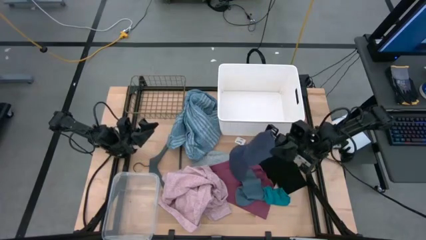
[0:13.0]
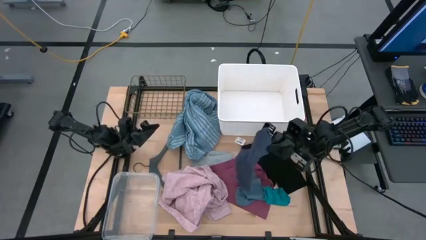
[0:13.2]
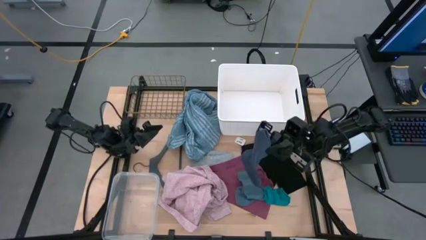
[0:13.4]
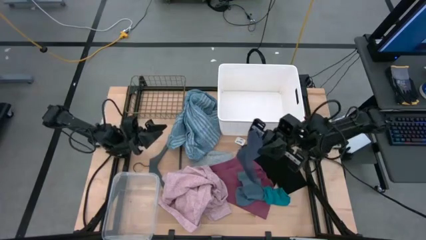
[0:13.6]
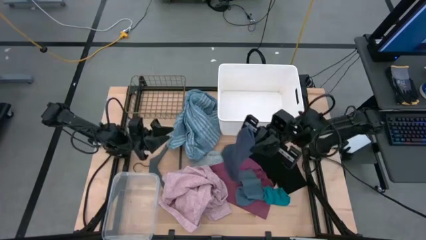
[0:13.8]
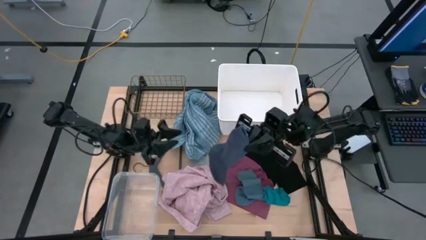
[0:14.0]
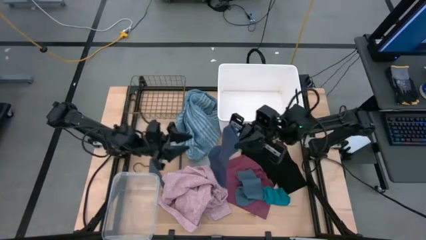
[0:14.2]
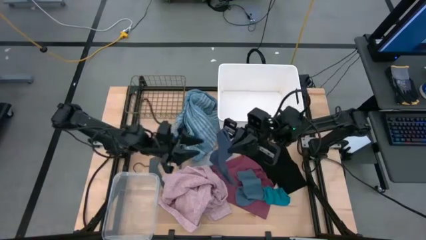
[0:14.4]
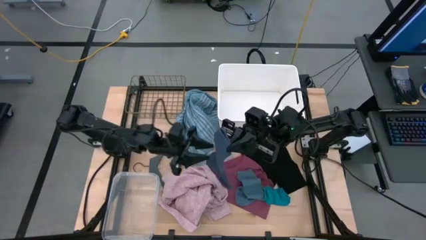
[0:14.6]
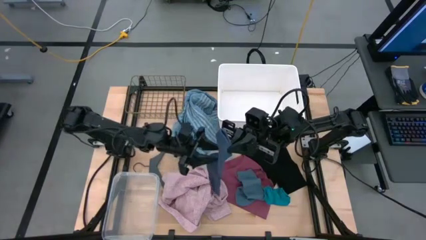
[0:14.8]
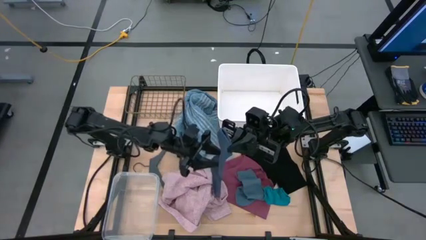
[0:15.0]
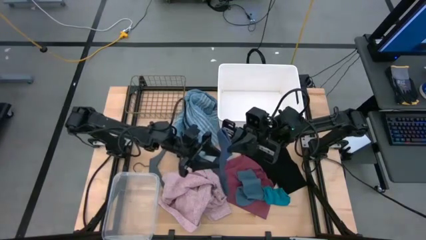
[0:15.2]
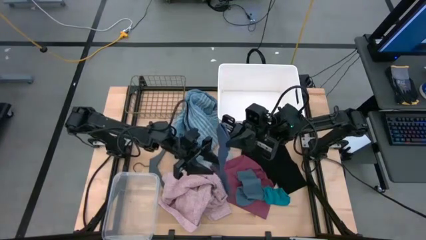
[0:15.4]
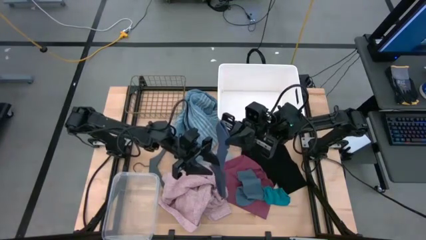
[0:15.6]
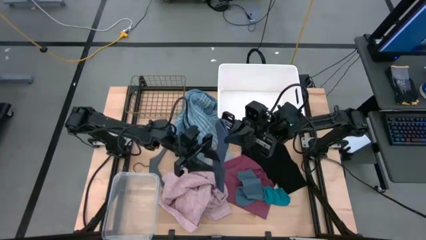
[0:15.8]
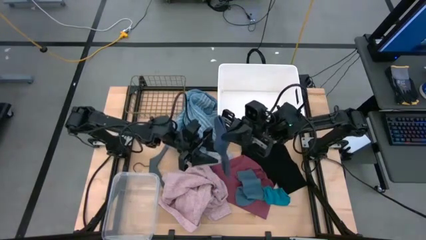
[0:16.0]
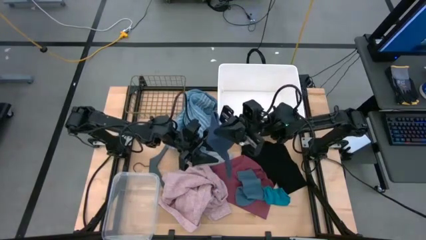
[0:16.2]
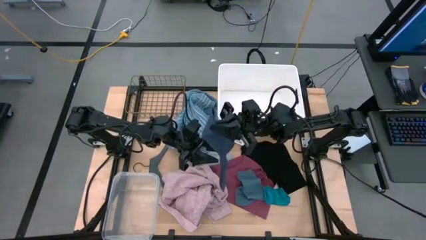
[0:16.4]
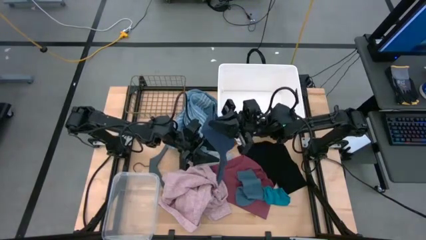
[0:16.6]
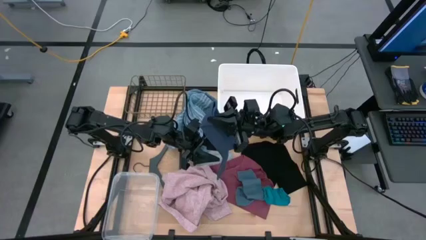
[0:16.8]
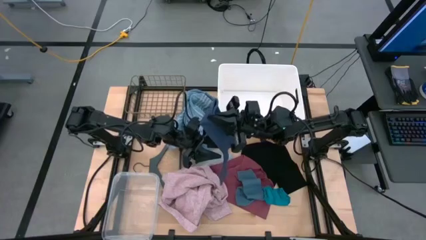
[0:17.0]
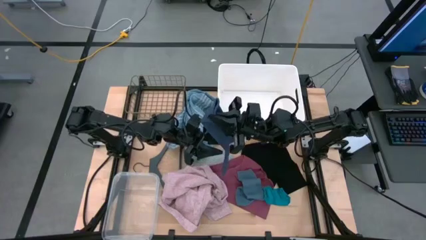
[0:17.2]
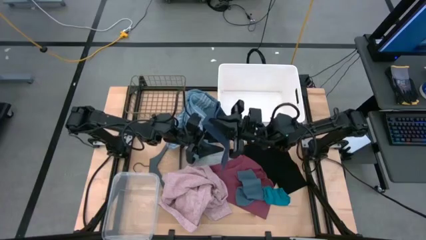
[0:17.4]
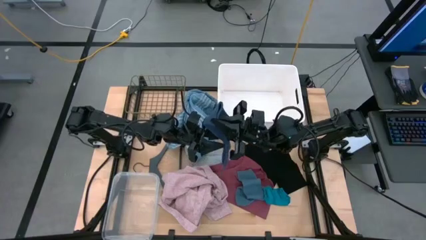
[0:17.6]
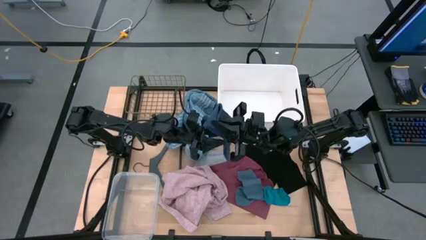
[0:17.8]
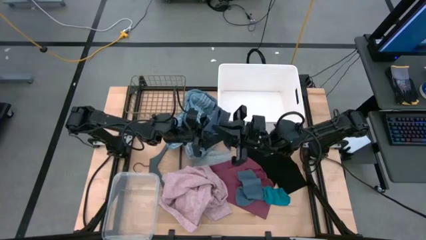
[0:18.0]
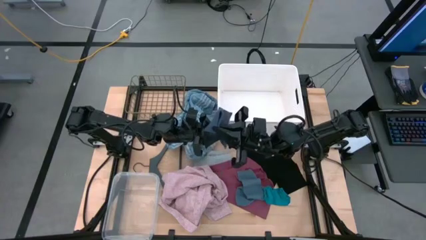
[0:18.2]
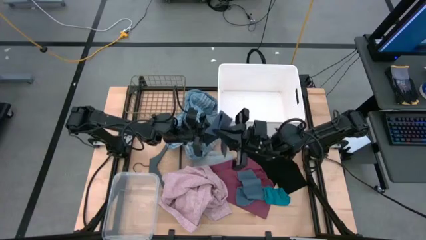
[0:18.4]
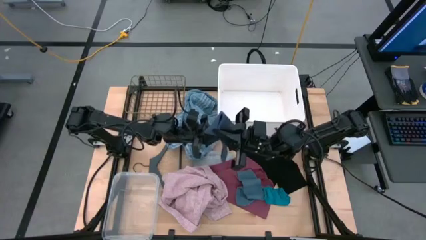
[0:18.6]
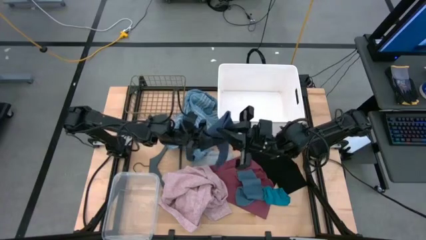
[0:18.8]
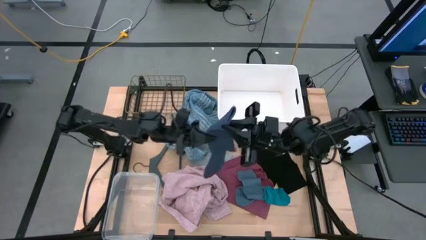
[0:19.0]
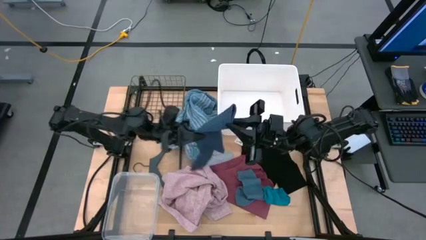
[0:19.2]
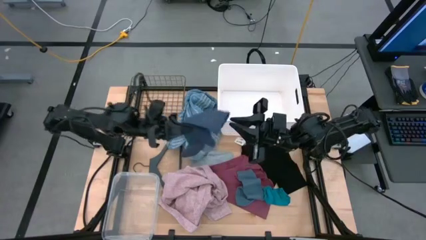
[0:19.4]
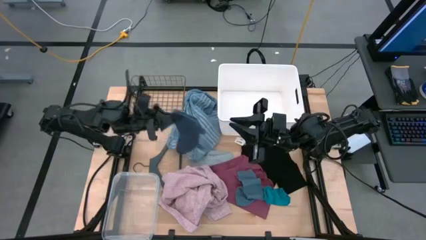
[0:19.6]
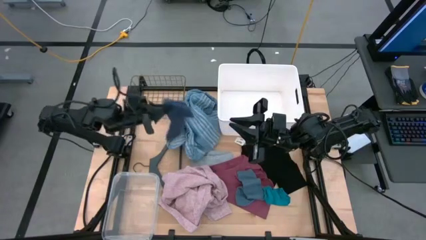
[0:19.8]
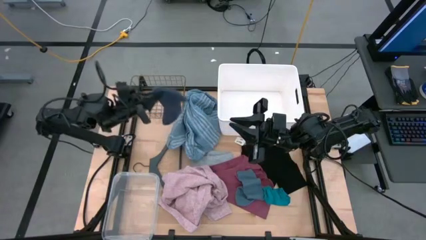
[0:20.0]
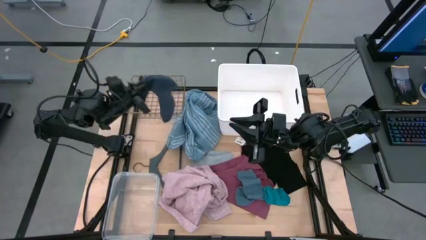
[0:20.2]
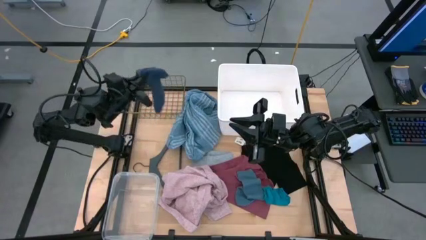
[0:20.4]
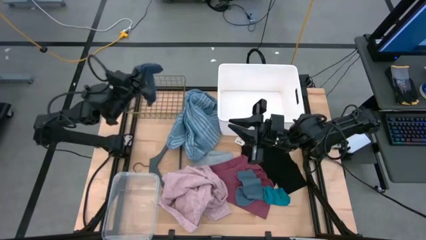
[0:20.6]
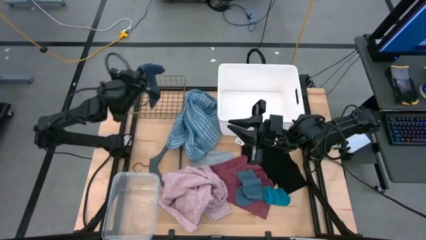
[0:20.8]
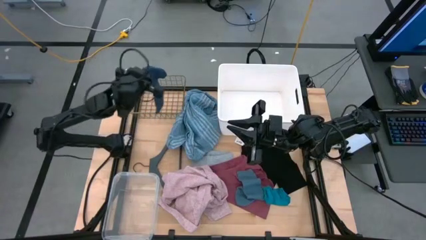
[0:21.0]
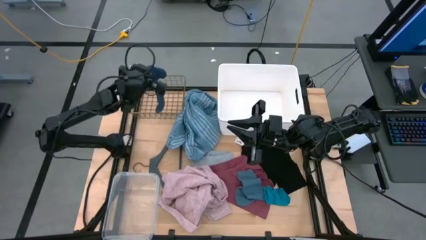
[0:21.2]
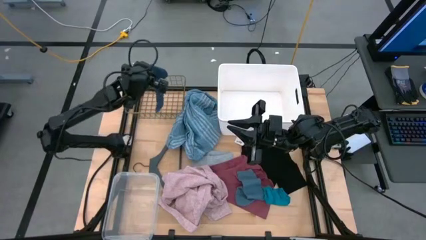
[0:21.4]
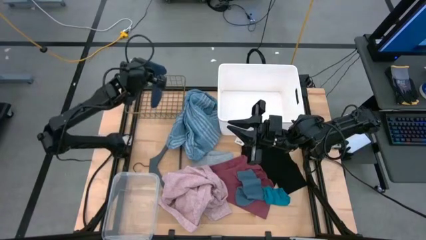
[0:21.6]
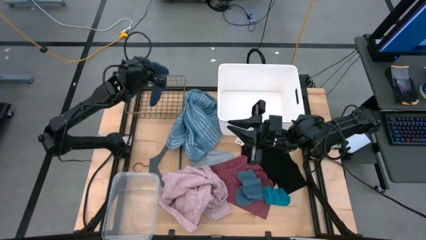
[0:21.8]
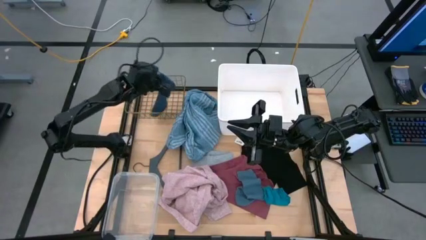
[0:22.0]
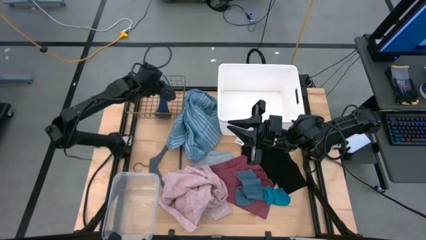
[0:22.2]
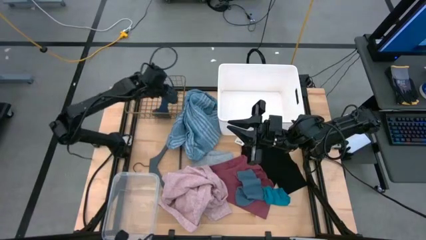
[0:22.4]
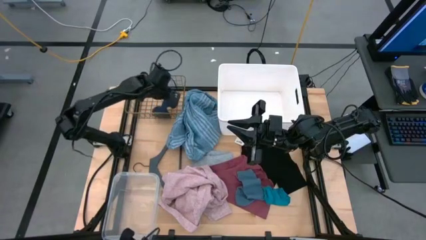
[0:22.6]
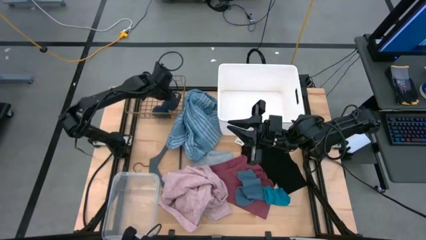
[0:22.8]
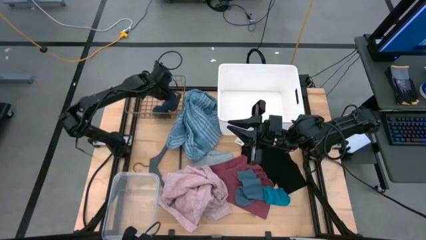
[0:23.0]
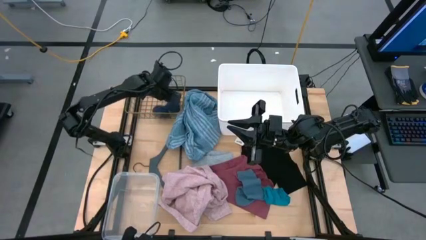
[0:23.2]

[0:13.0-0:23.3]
Task: Pick & Place Cloths
Put the dark blue sock into the wire basket

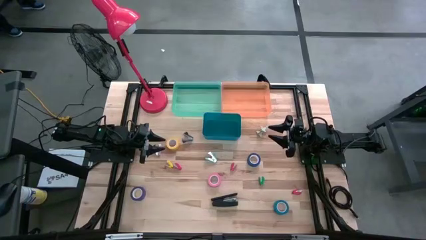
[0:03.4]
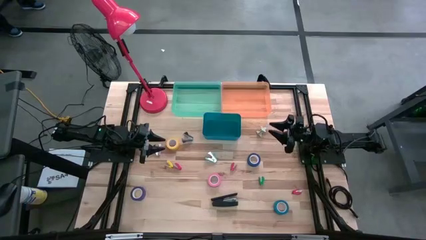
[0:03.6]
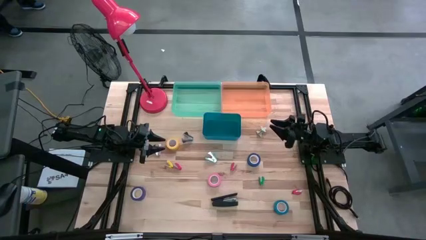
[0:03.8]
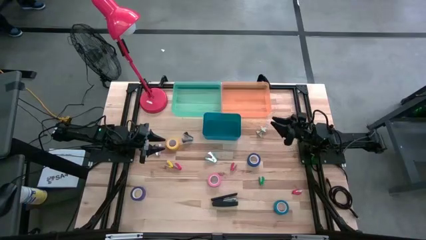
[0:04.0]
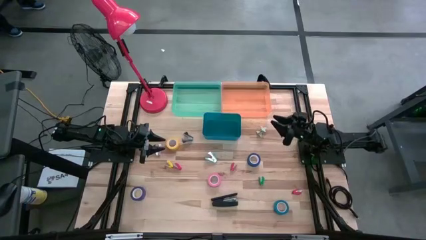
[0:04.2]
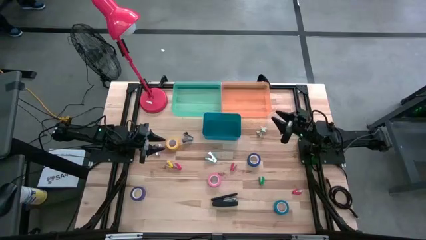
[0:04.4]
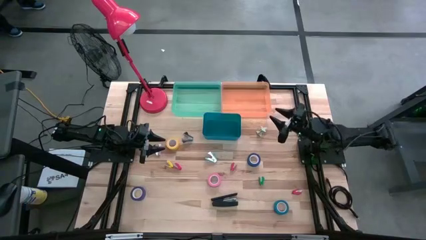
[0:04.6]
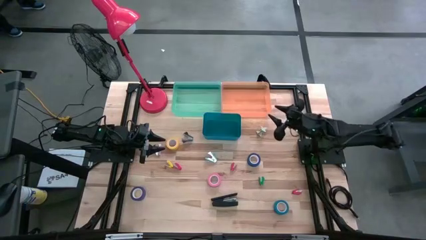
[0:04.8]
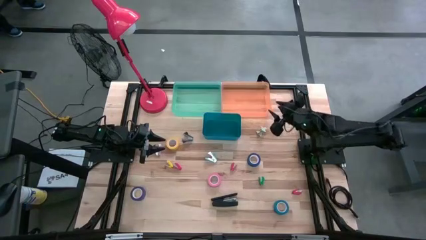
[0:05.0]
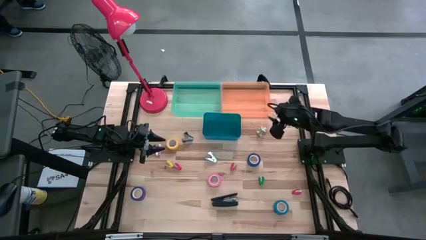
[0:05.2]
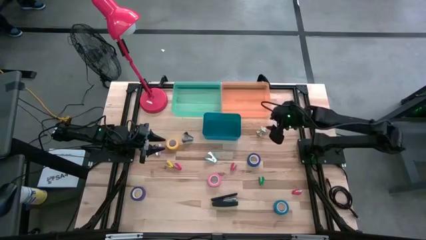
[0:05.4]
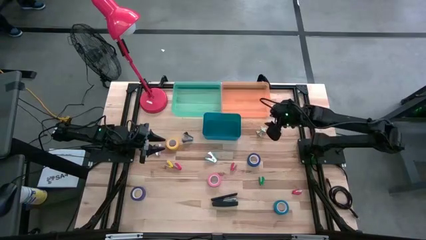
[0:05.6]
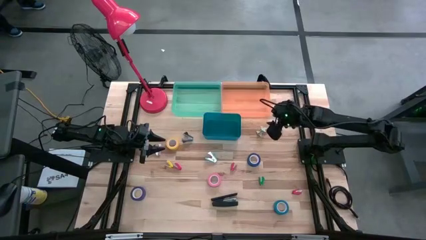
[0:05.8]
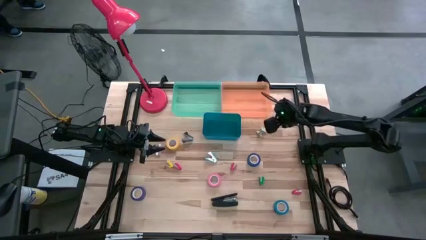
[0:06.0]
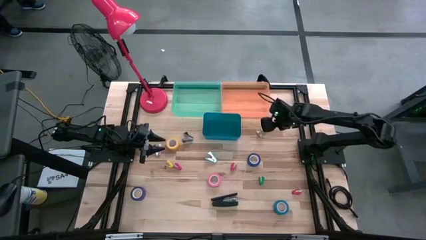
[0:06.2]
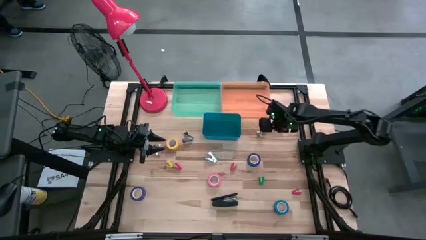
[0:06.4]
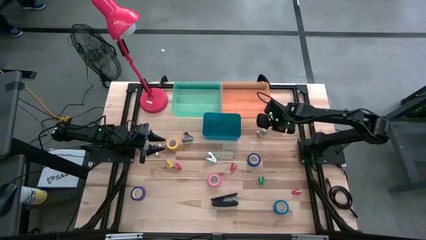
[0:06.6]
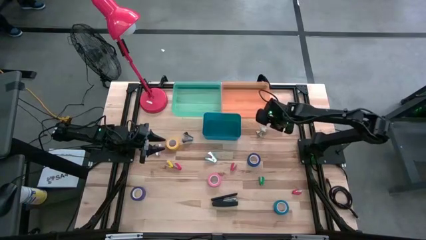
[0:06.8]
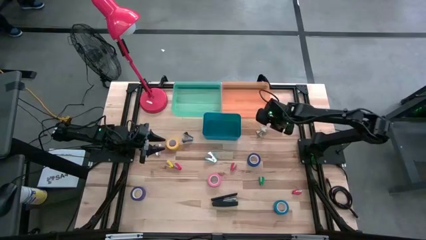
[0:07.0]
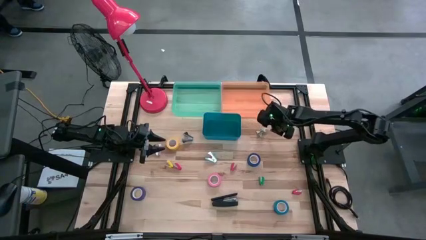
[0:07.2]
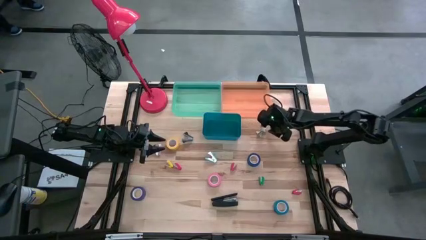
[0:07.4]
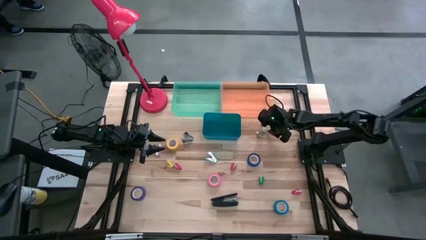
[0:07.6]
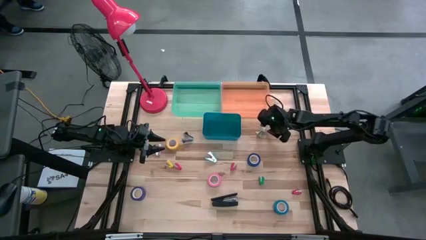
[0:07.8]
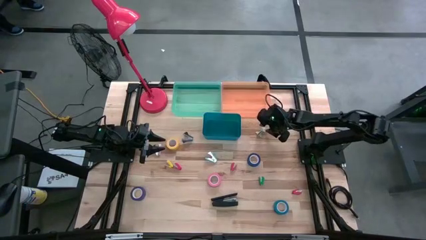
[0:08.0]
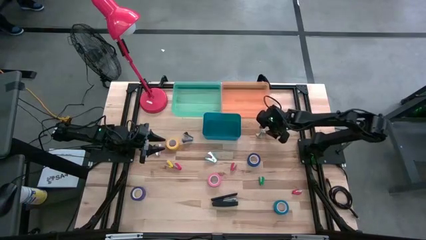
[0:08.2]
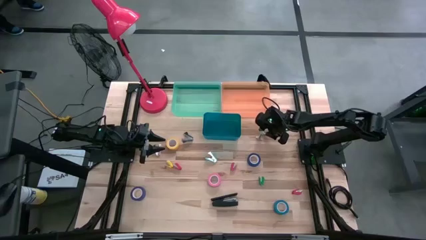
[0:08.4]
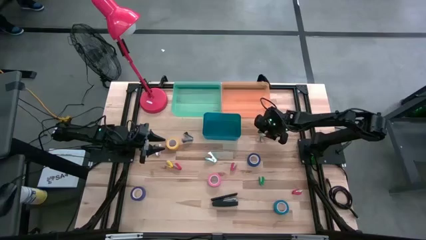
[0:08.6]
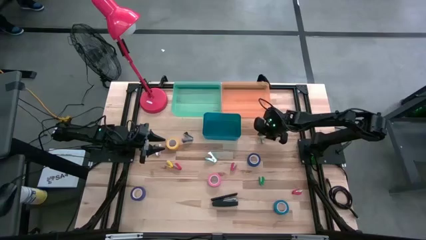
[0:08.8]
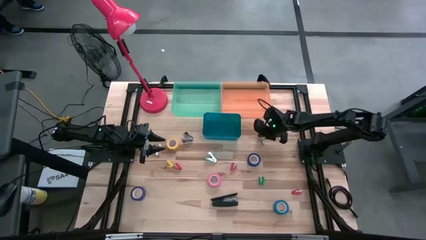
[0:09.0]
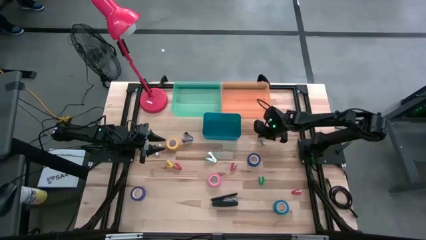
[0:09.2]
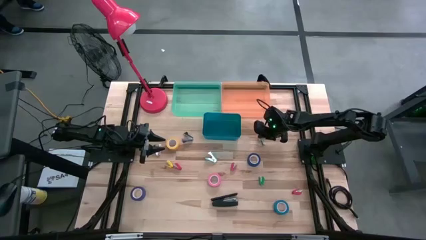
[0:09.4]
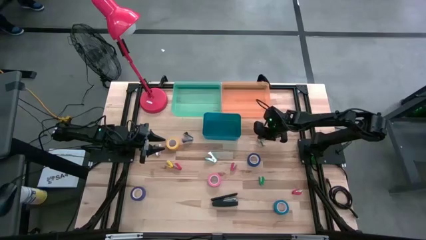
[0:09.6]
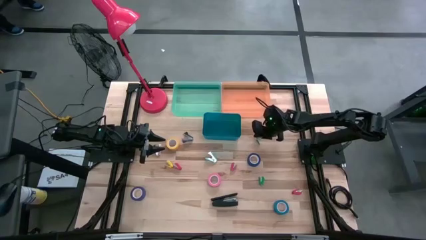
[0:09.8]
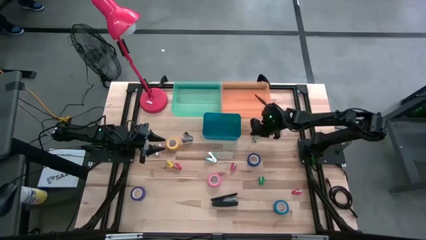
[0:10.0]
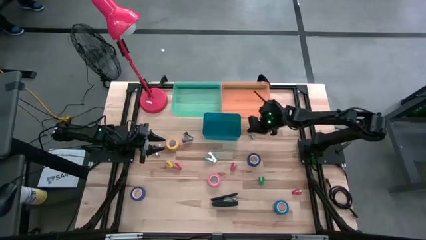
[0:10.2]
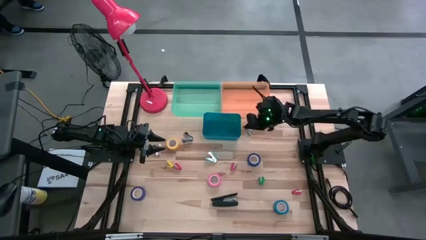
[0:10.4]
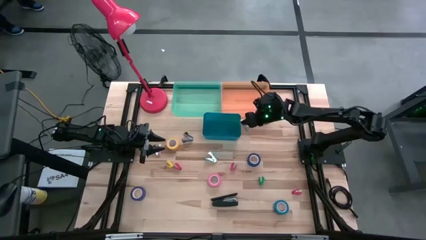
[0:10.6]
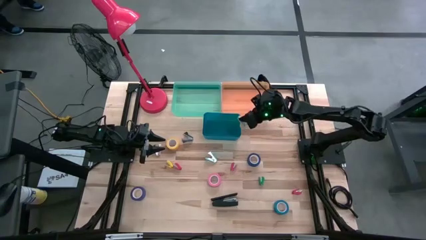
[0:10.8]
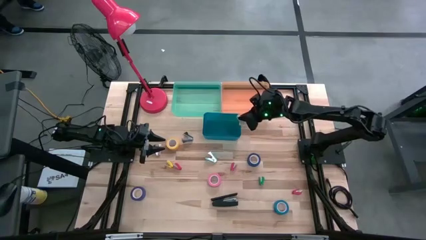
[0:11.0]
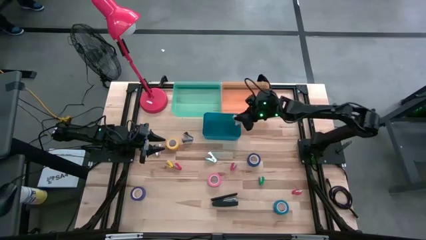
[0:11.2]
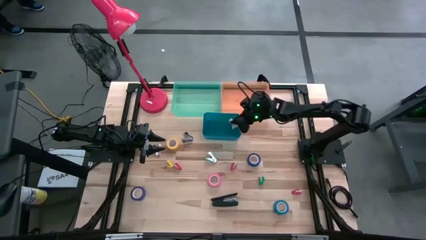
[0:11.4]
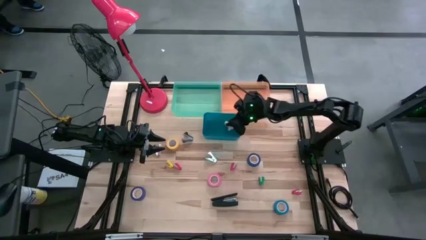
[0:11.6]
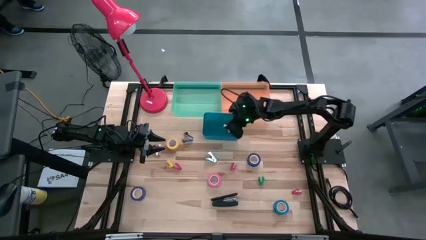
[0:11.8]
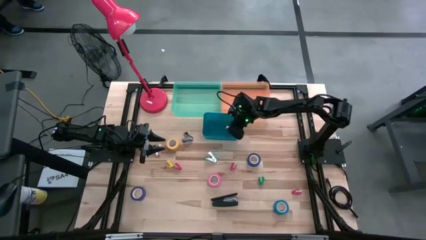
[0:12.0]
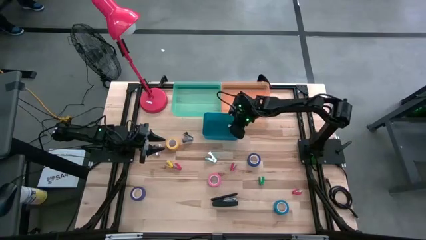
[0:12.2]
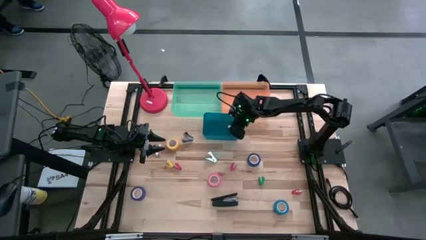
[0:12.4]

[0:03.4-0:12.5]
Task: Pick and place Stapler, Stapler remover, tape
Put the white staple remover into the blue bin
